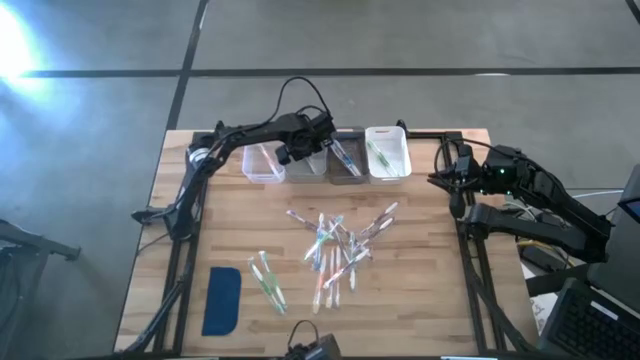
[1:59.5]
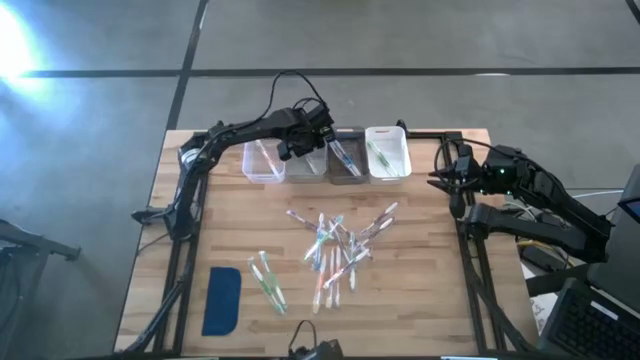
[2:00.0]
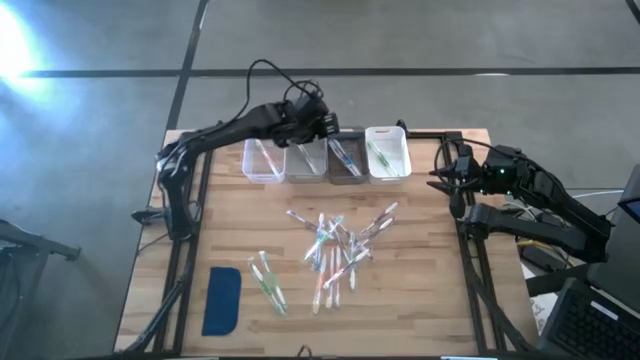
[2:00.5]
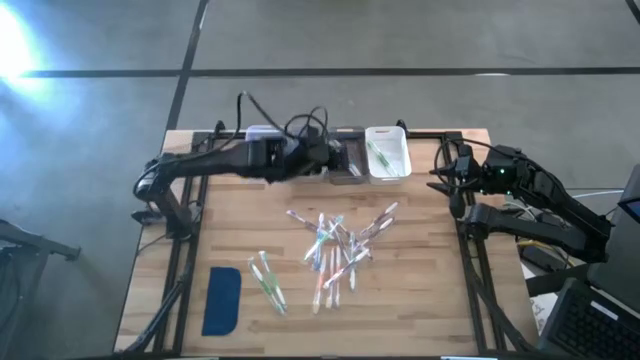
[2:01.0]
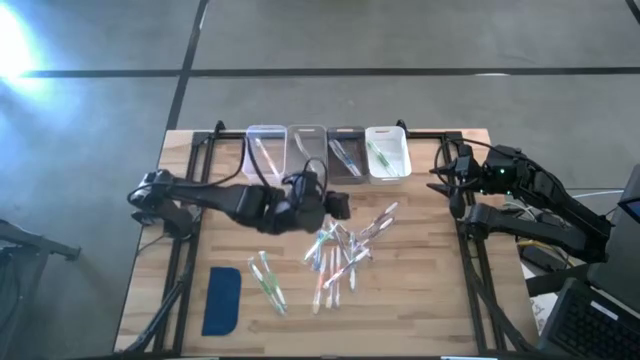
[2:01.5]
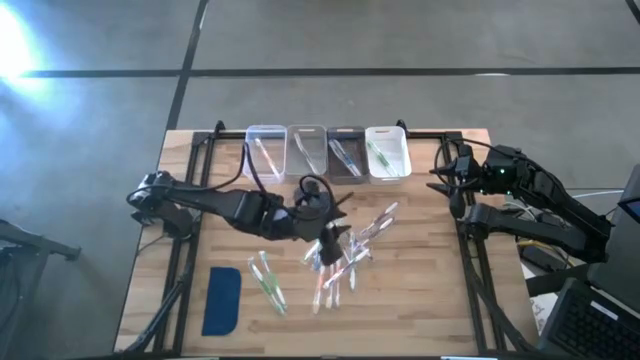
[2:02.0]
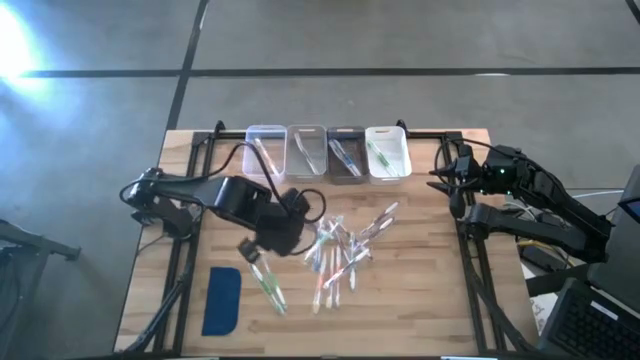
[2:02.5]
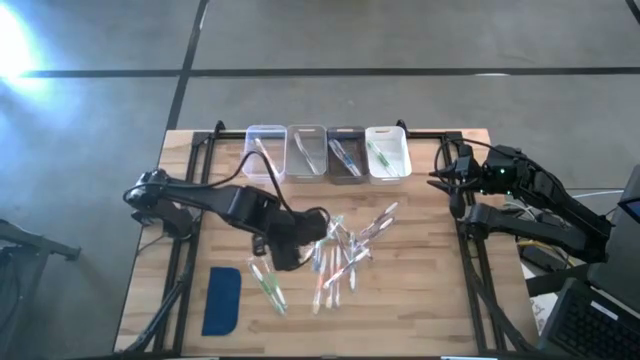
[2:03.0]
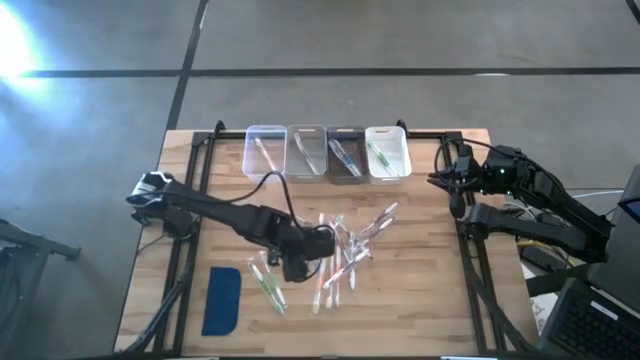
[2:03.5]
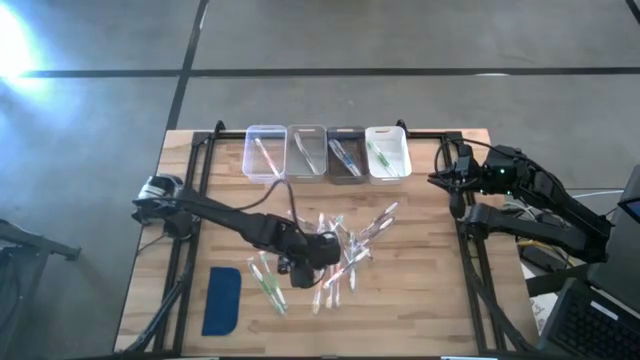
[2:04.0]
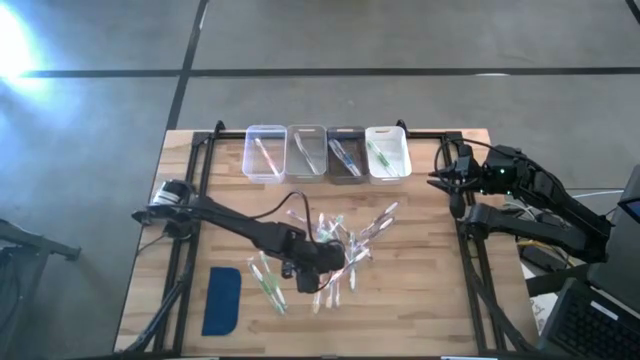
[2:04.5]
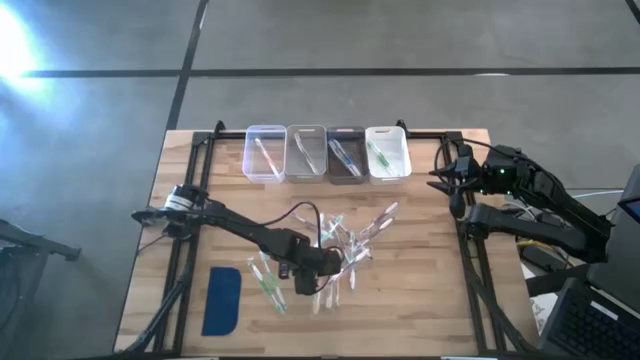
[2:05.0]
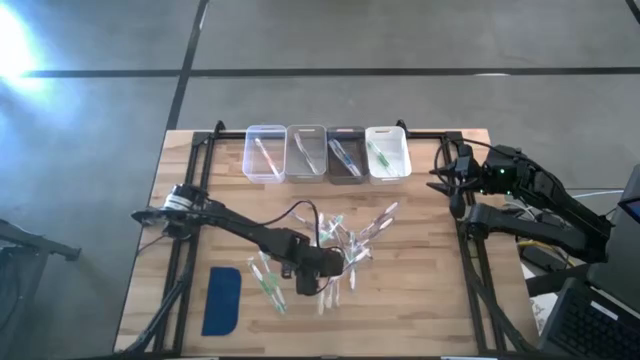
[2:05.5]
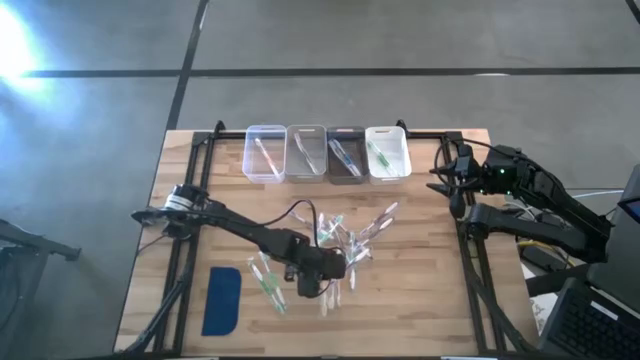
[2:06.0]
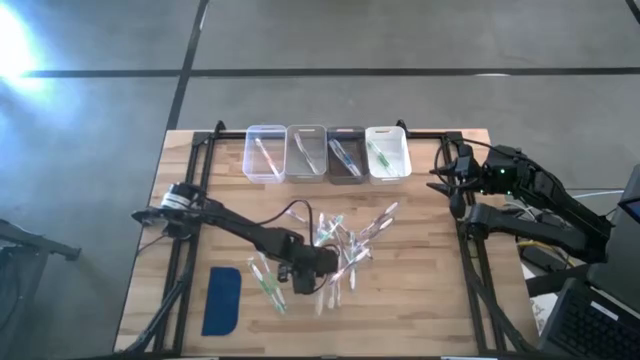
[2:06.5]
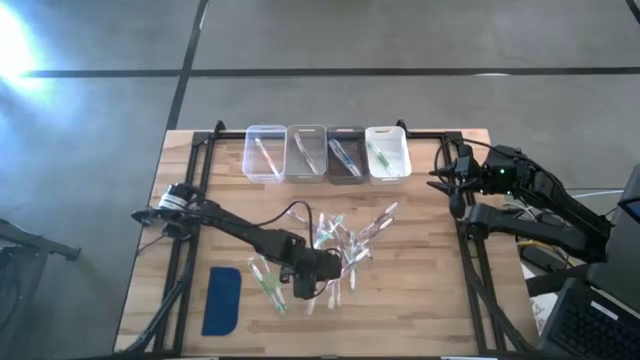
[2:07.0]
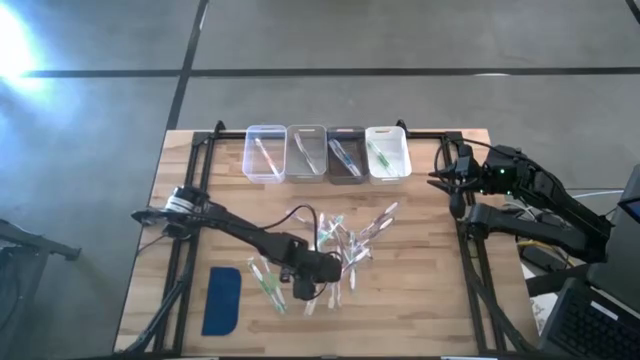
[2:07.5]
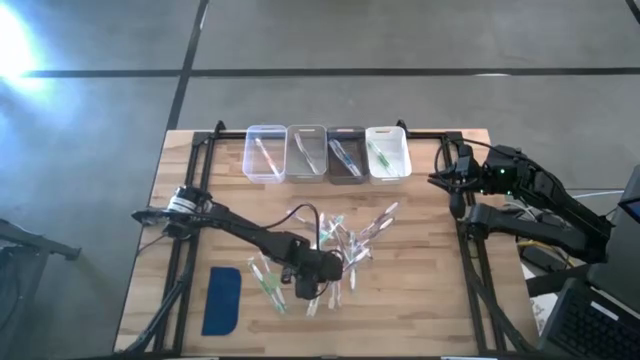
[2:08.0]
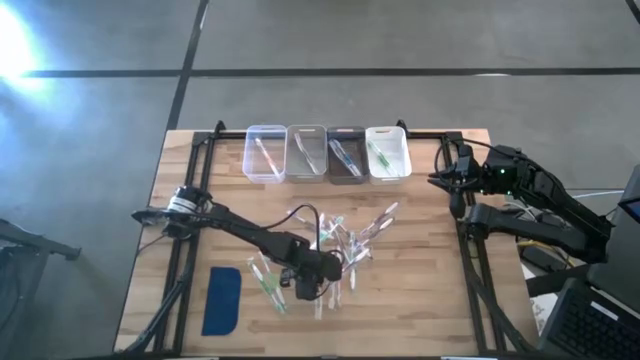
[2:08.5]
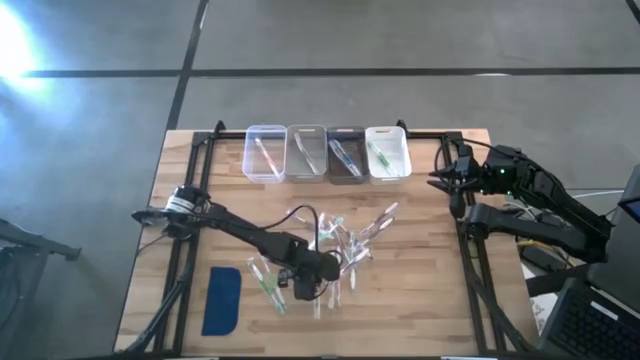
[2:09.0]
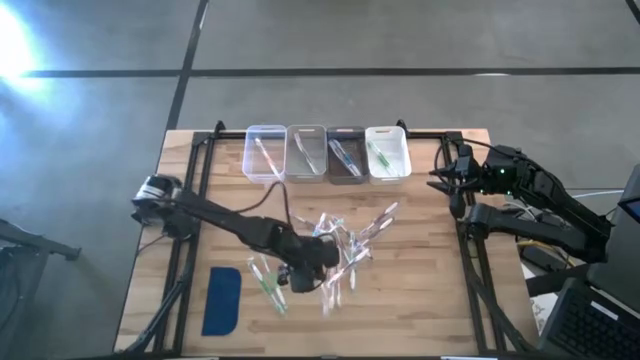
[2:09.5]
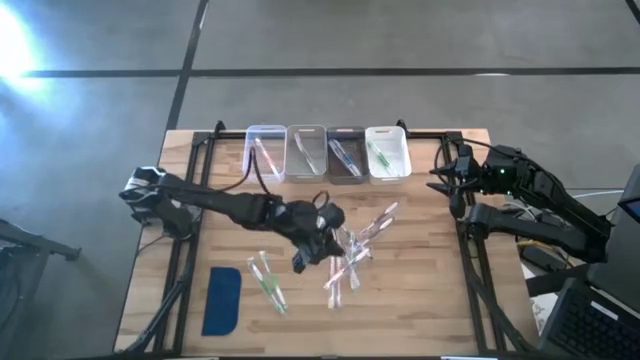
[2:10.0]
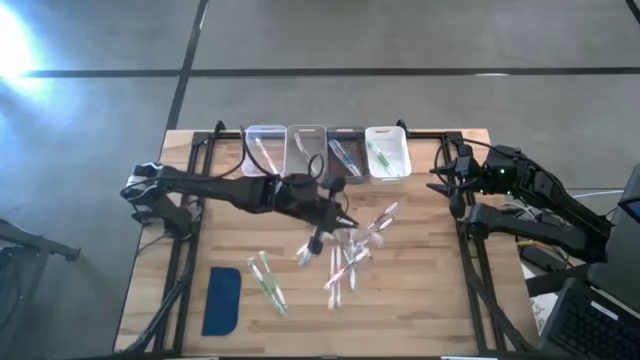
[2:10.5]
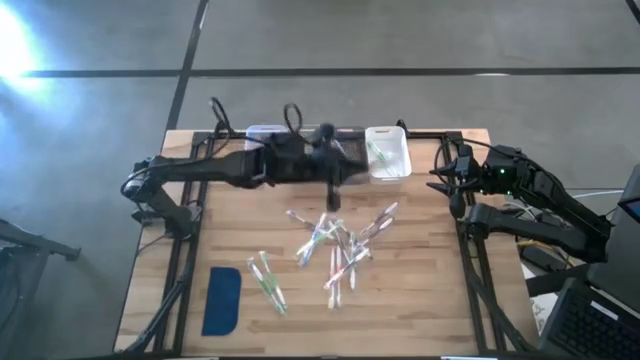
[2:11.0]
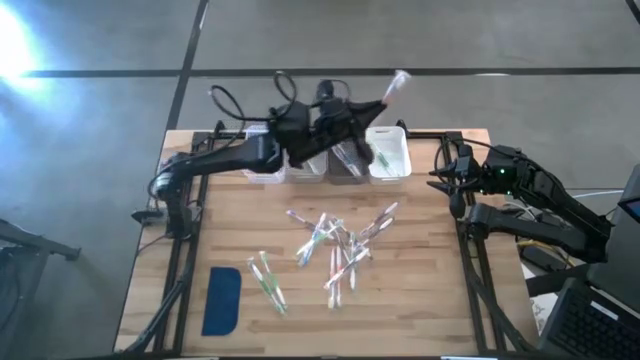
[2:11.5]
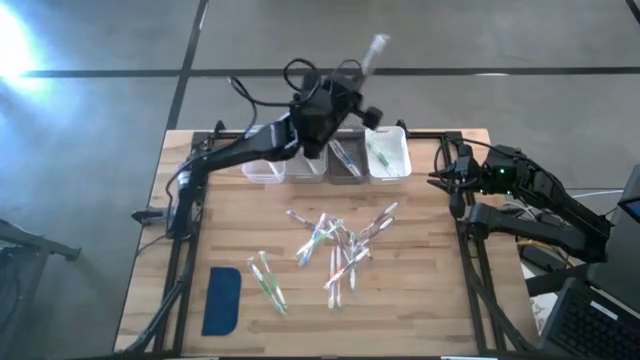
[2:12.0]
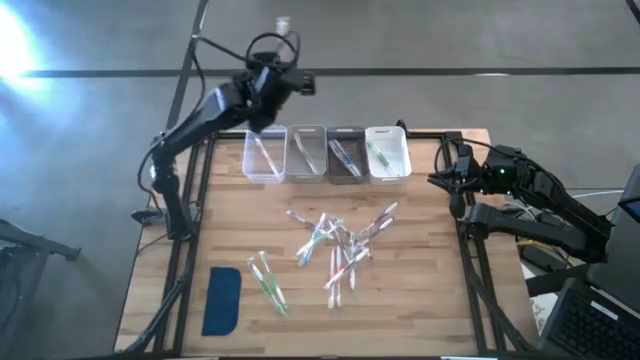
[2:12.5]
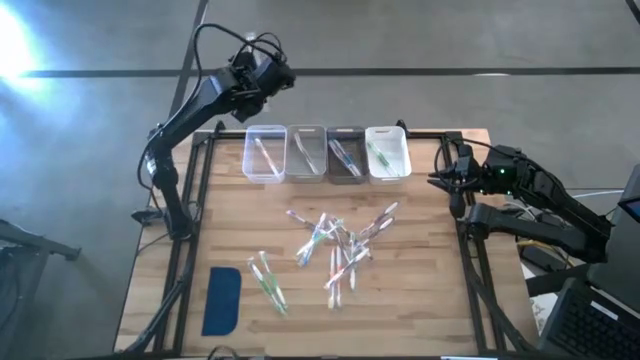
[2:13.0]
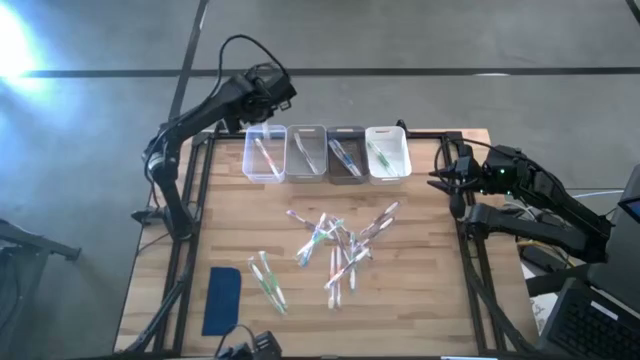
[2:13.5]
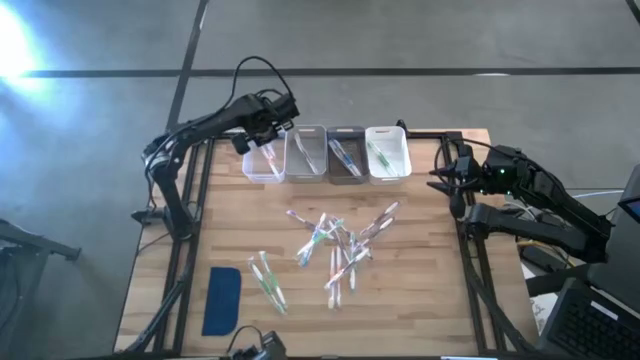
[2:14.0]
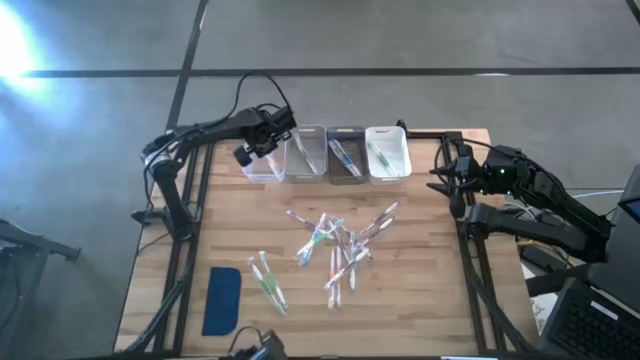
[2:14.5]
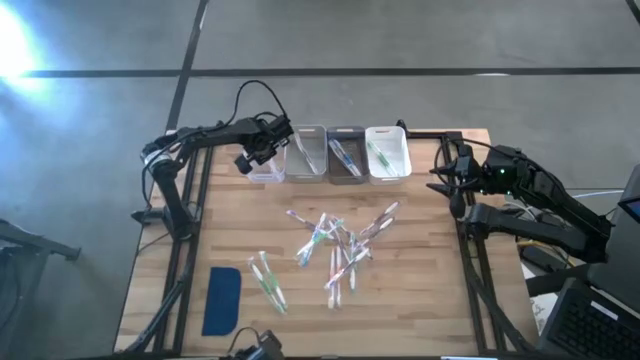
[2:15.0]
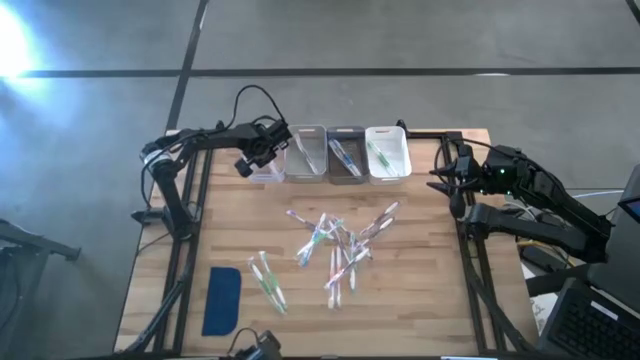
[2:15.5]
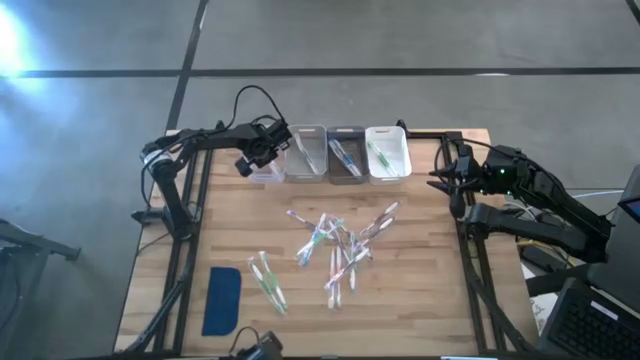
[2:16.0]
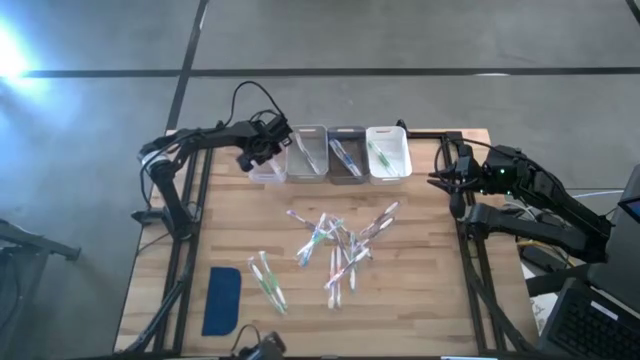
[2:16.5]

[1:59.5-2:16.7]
Task: Pick & Place Toothbrushes
Put the orange toothbrush into the white transparent bin

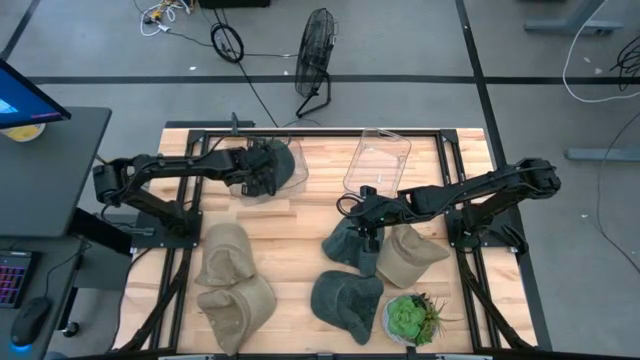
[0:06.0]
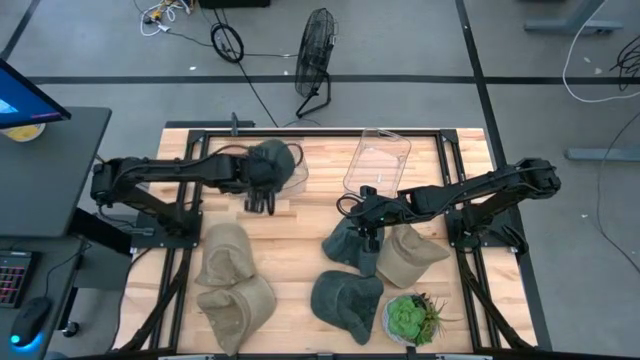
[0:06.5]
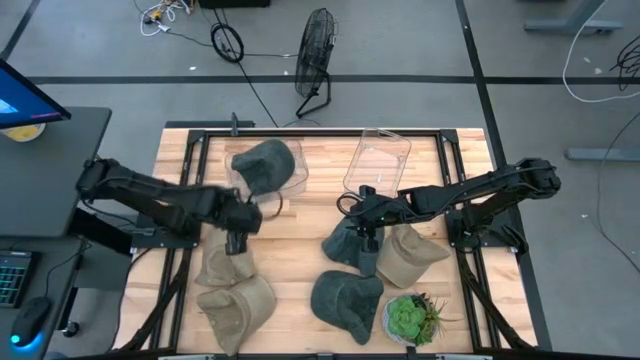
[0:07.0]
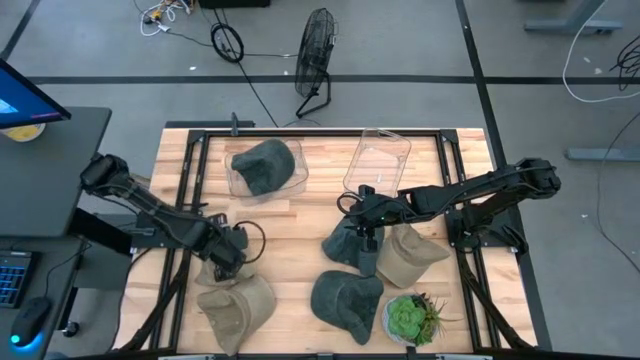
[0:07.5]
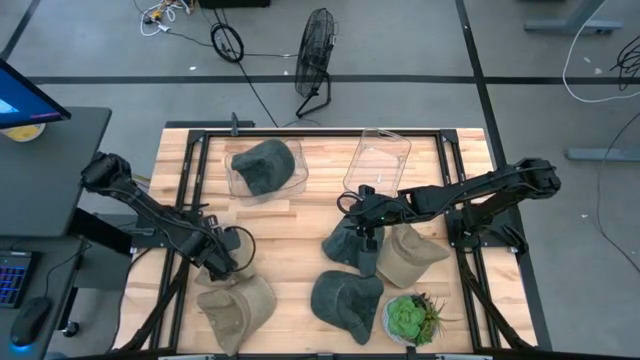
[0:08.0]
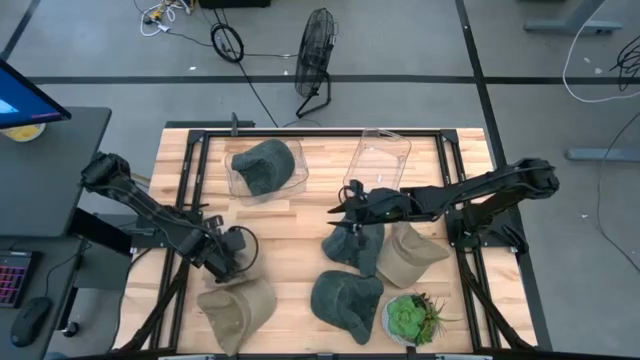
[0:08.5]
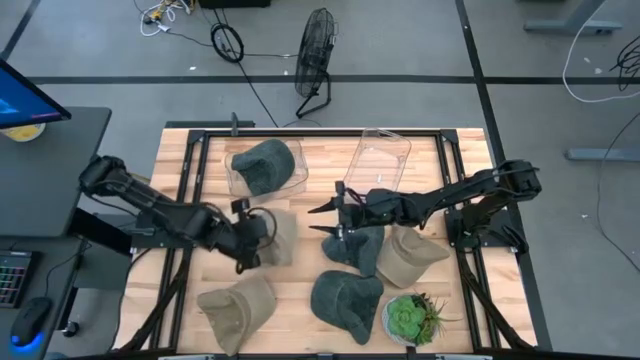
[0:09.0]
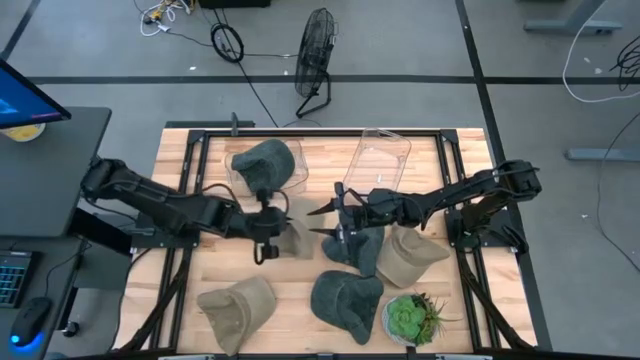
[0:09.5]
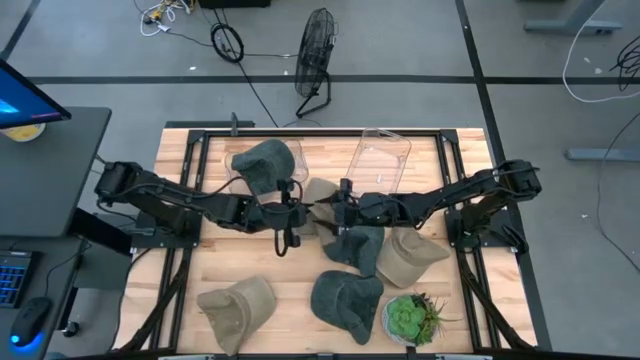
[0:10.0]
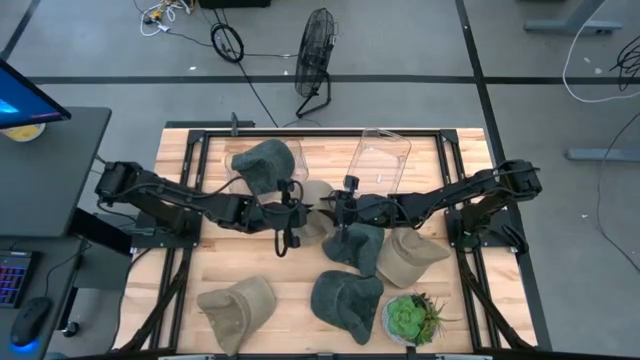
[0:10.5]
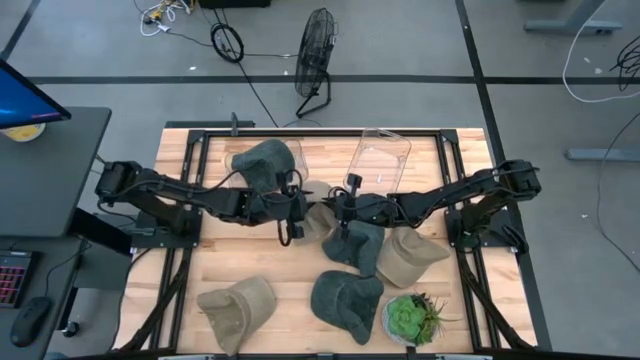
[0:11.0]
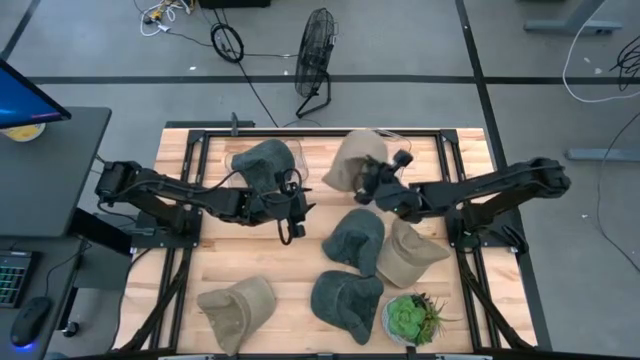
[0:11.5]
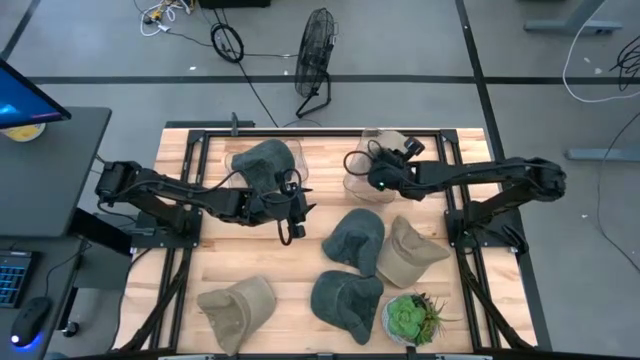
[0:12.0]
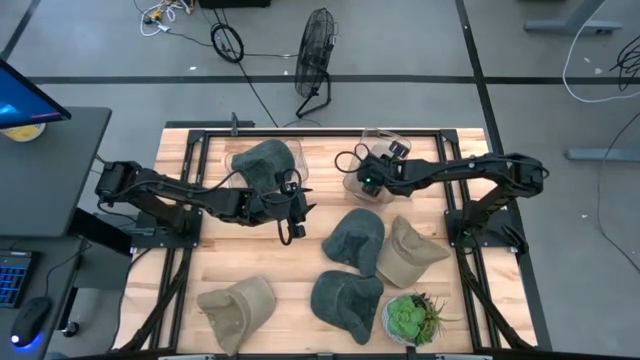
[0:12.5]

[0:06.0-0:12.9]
Task: Pick & Place hat
Put the top left brown cap into the right transparent bin
